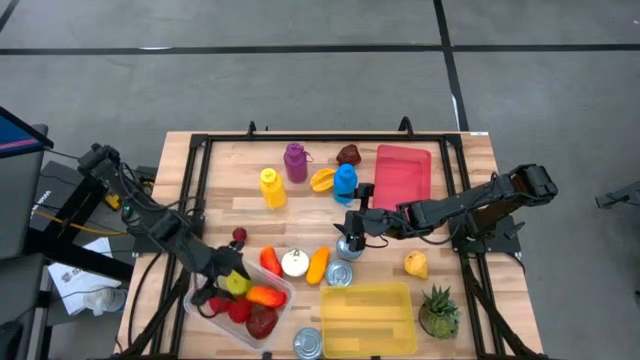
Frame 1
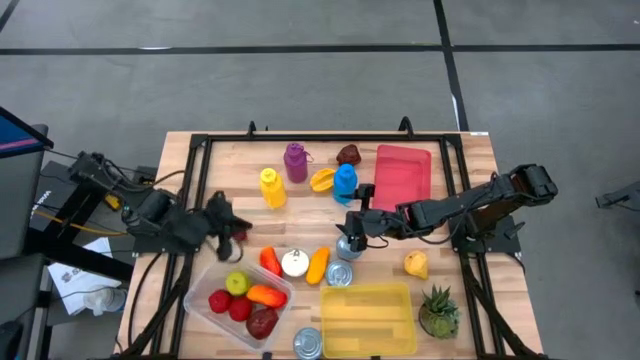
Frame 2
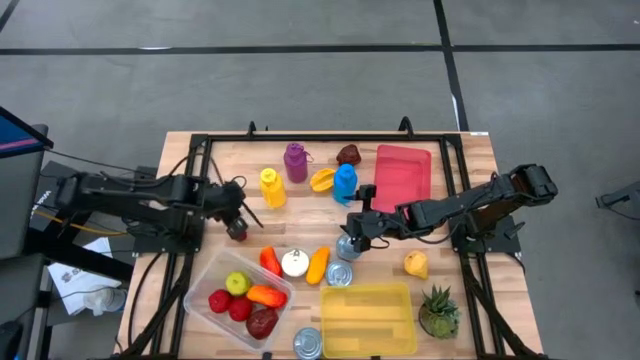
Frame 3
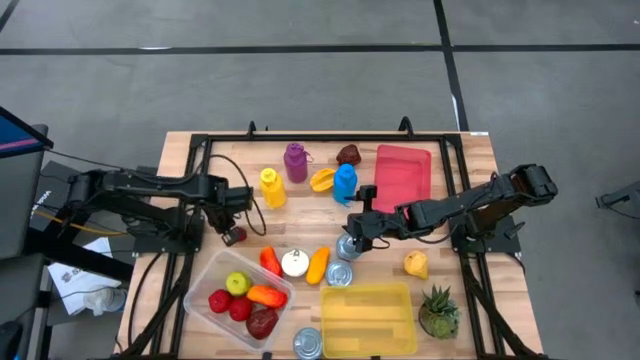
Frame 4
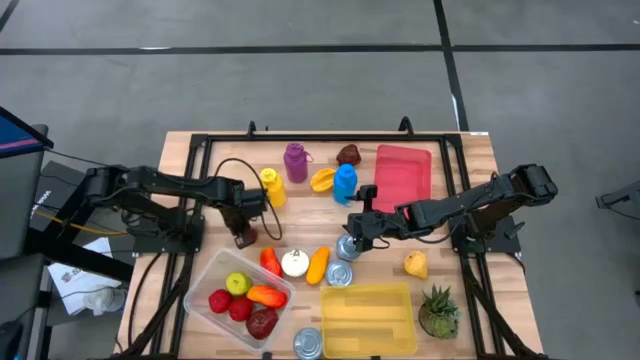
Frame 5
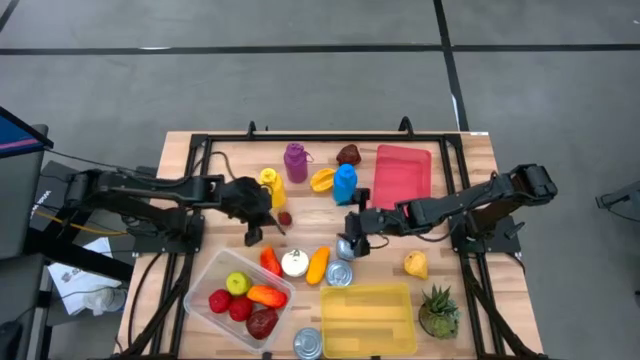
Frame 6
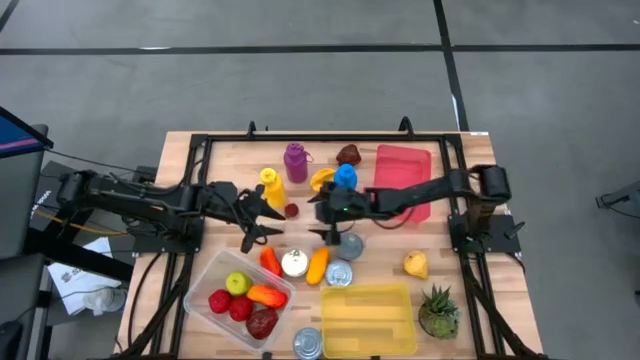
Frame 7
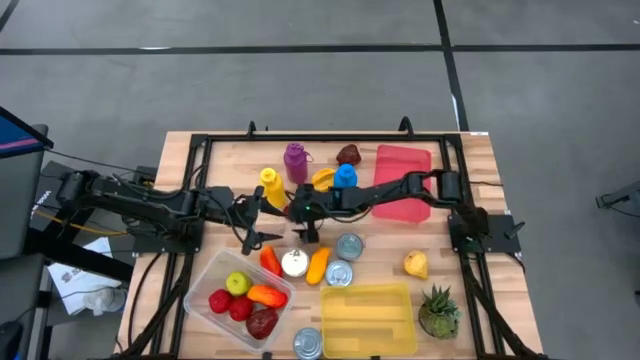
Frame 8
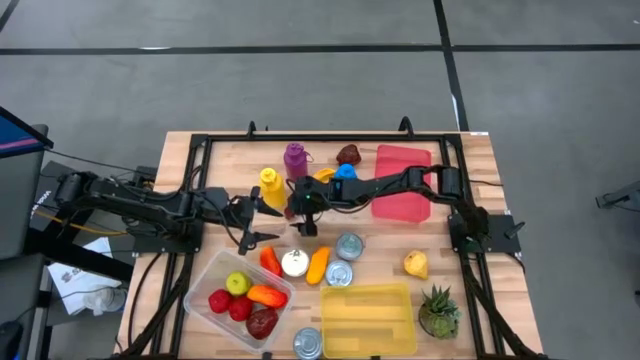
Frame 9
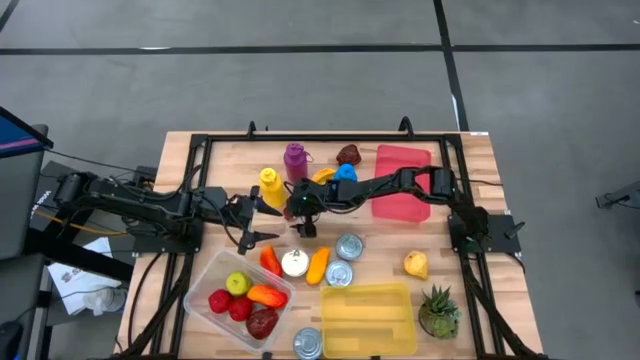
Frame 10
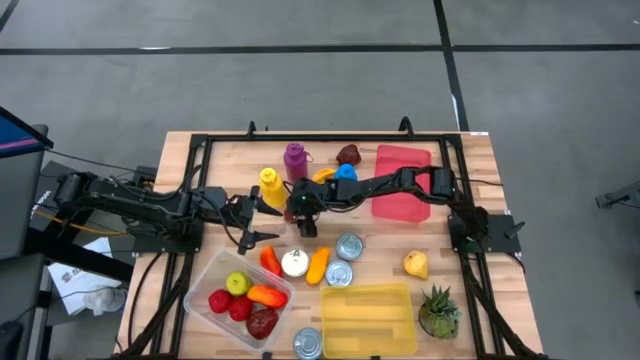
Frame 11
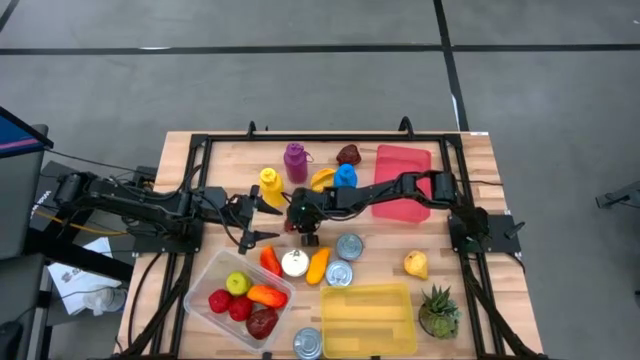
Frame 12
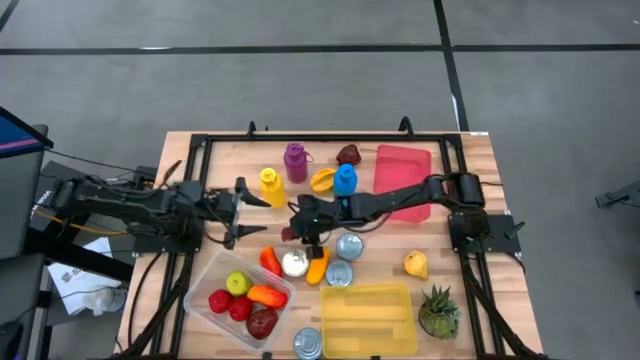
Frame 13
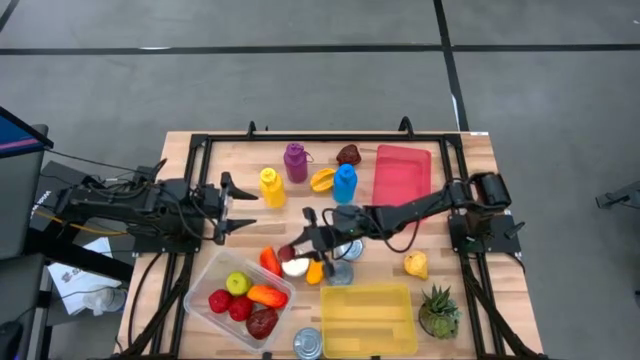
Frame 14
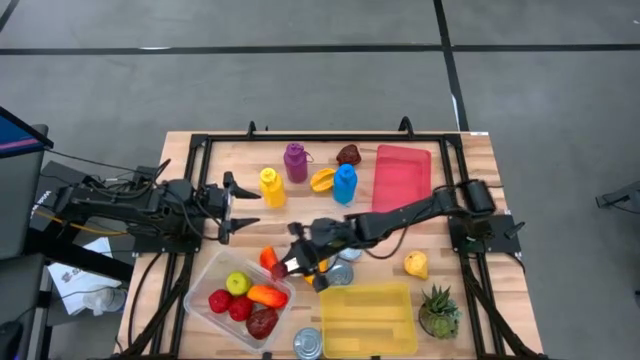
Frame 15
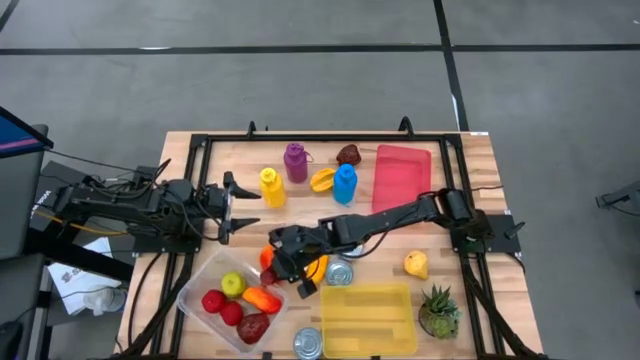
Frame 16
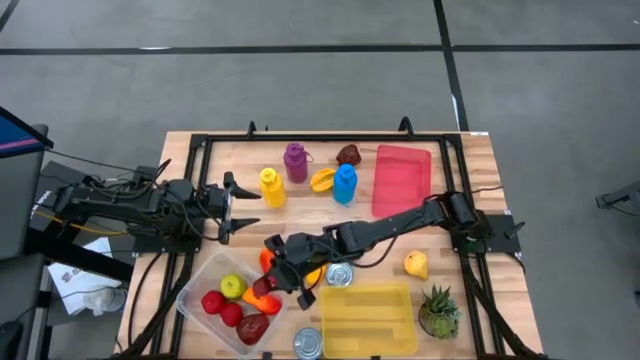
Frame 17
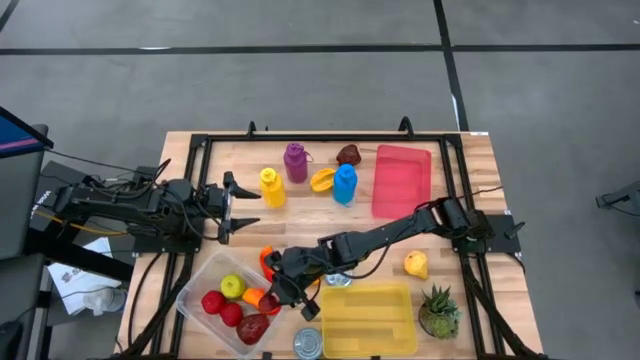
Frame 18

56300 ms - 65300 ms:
Task: Pick & Place Food Item
Put the red pomegranate into the transparent bin

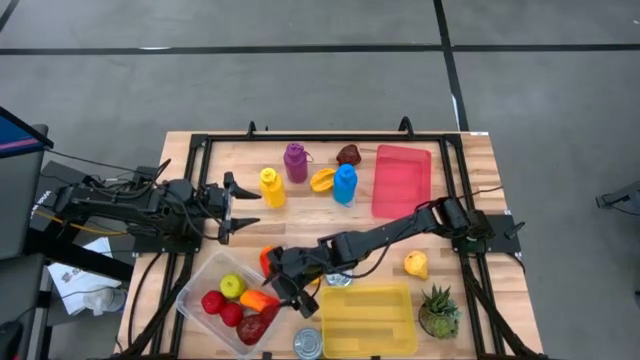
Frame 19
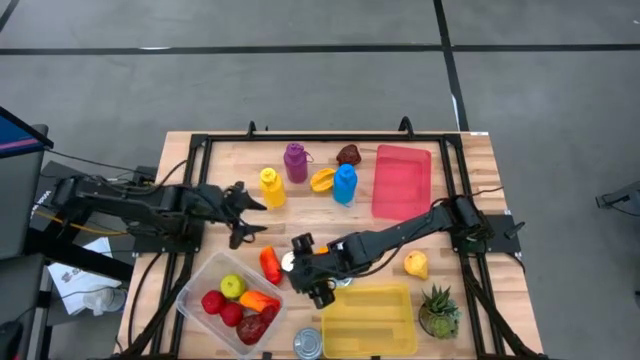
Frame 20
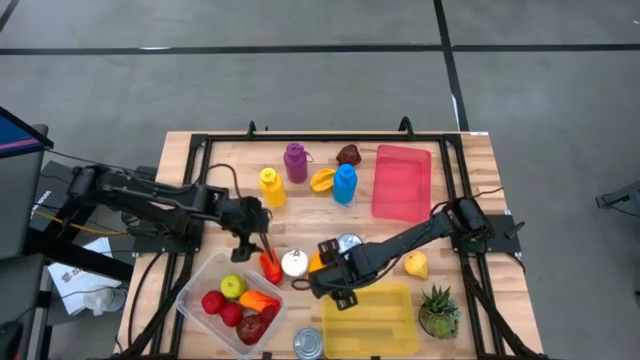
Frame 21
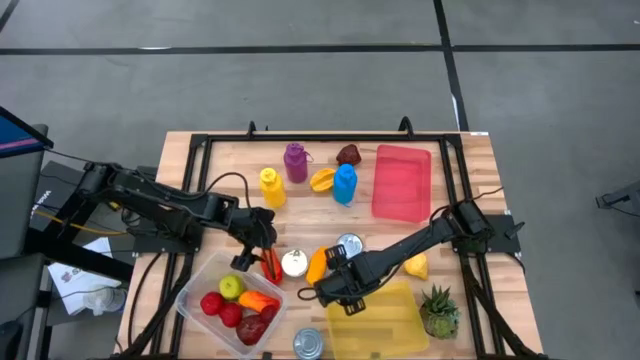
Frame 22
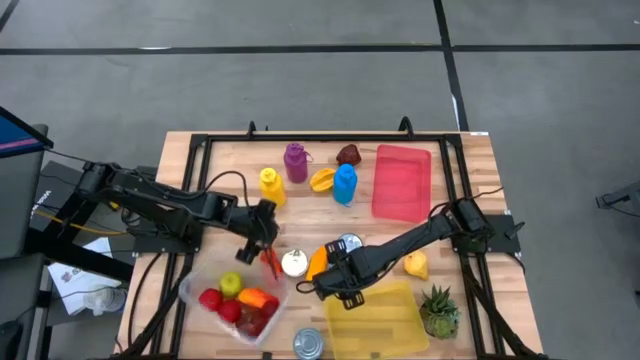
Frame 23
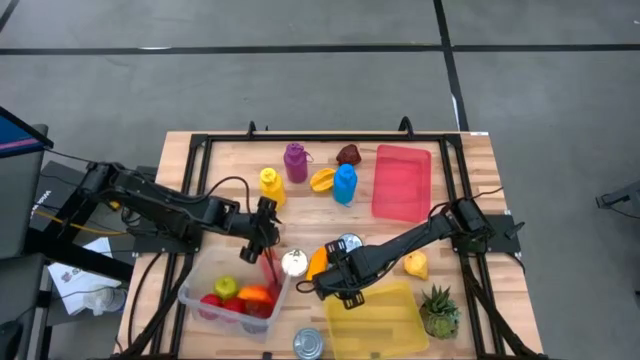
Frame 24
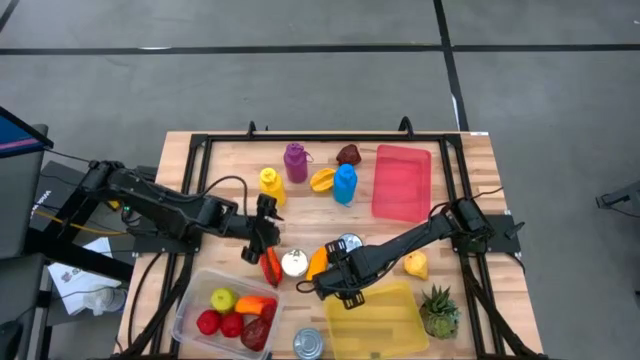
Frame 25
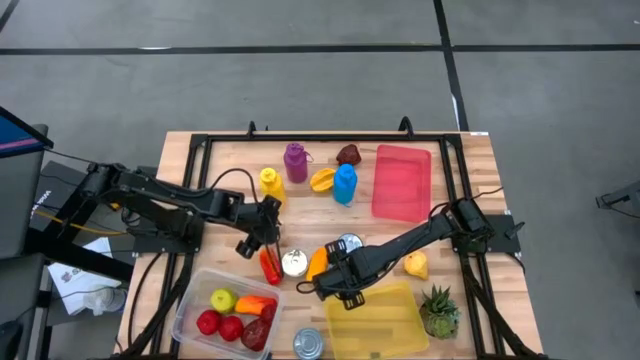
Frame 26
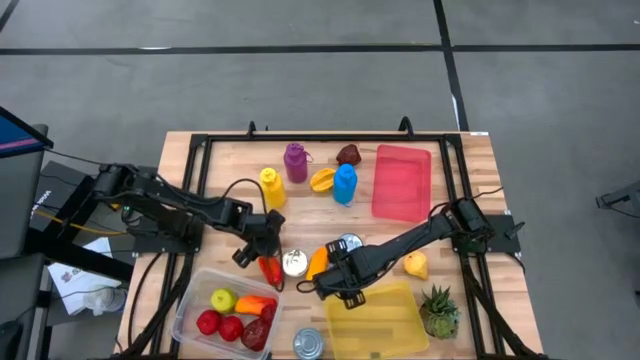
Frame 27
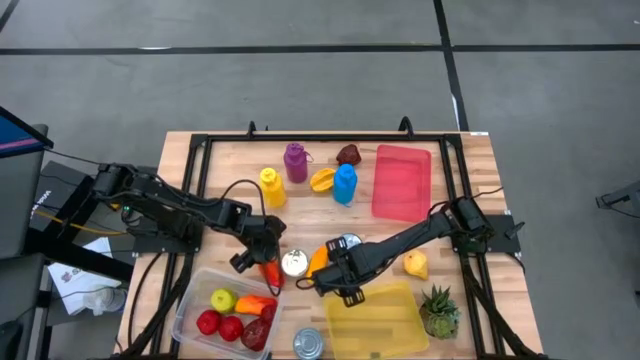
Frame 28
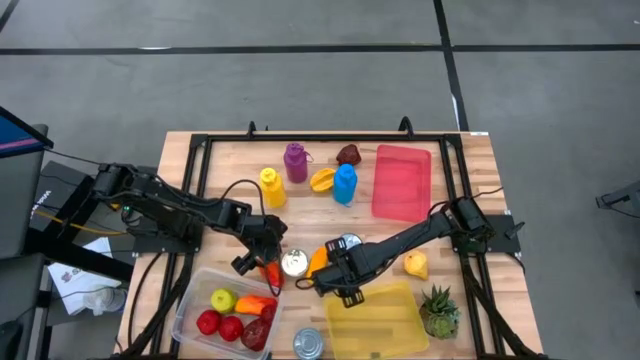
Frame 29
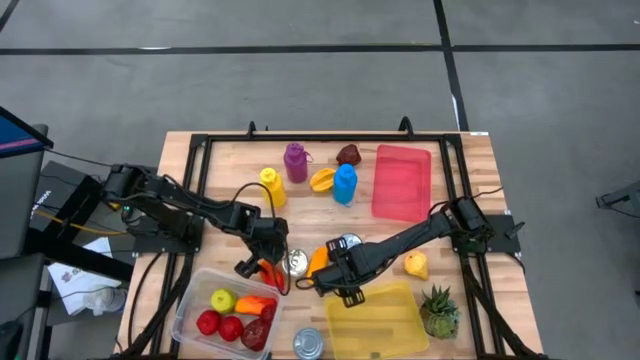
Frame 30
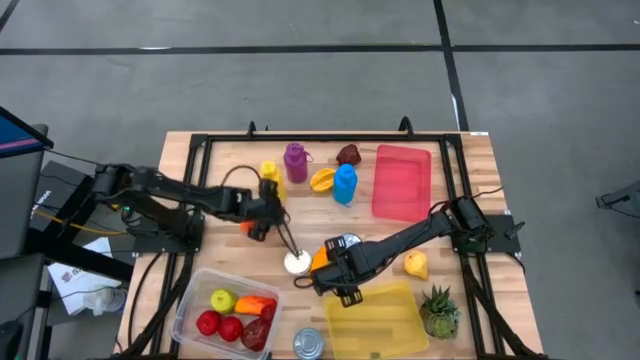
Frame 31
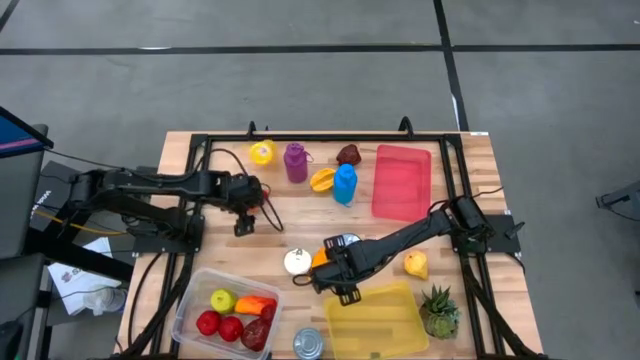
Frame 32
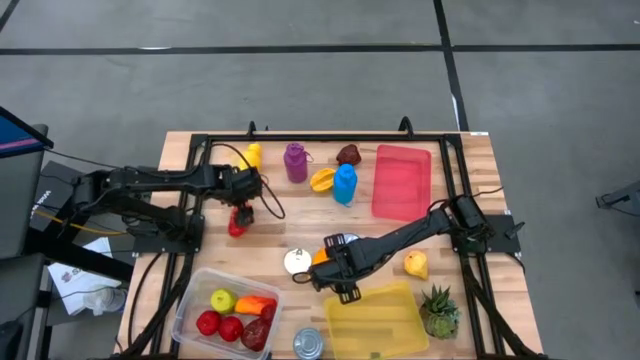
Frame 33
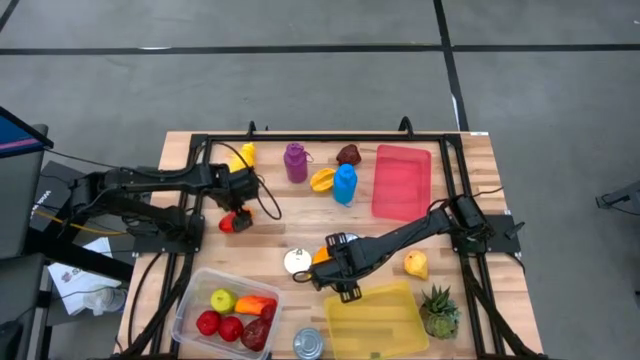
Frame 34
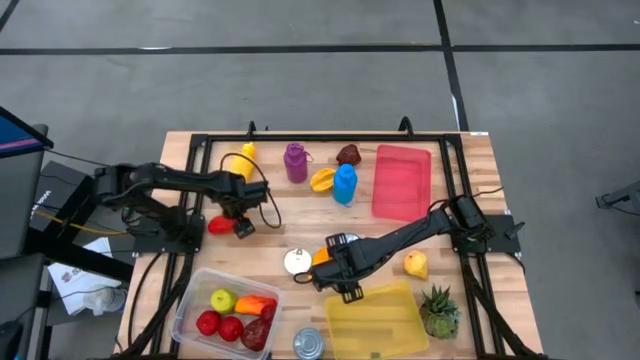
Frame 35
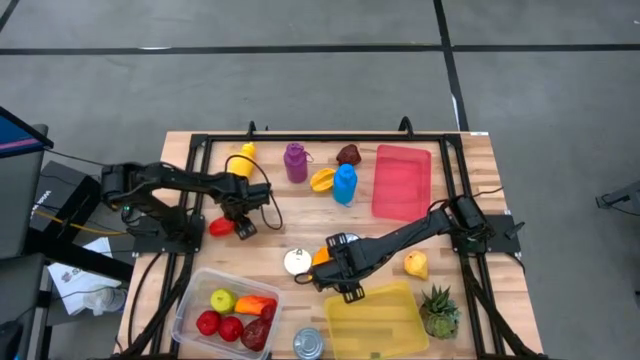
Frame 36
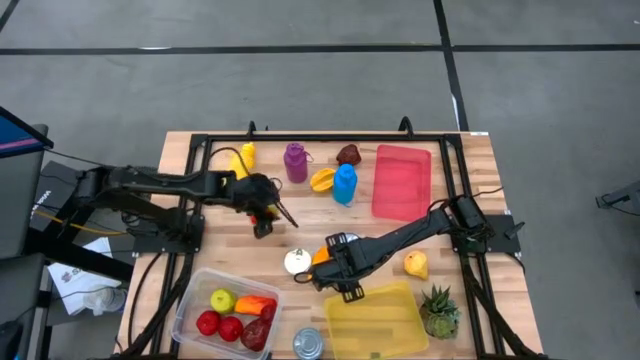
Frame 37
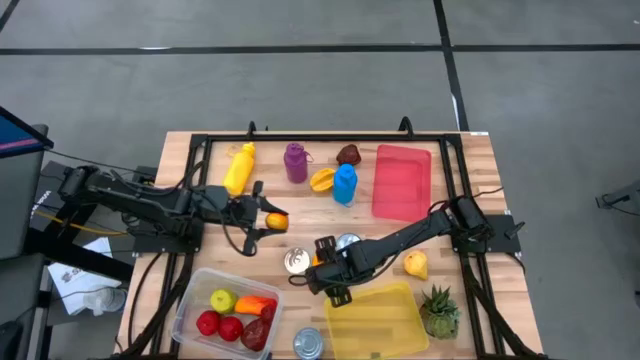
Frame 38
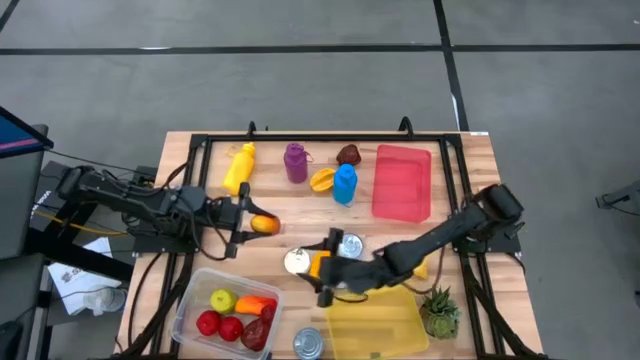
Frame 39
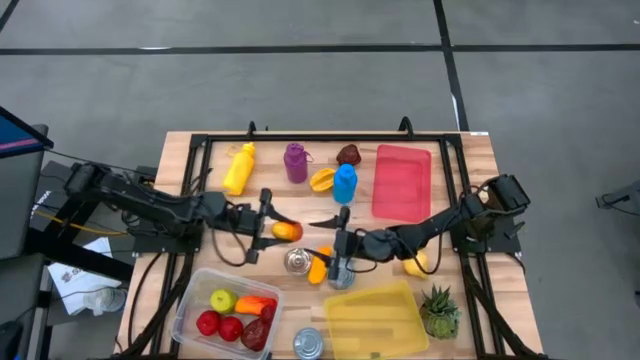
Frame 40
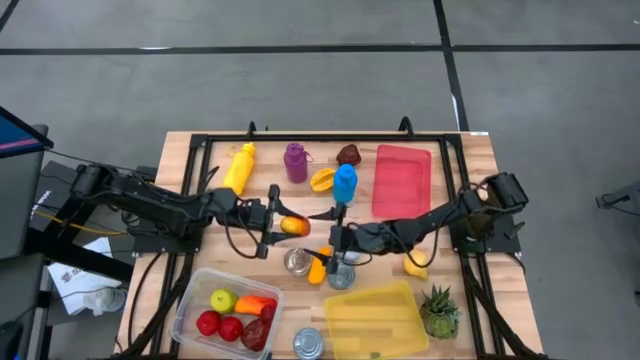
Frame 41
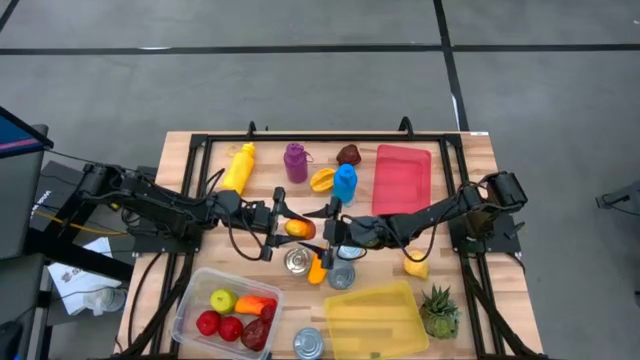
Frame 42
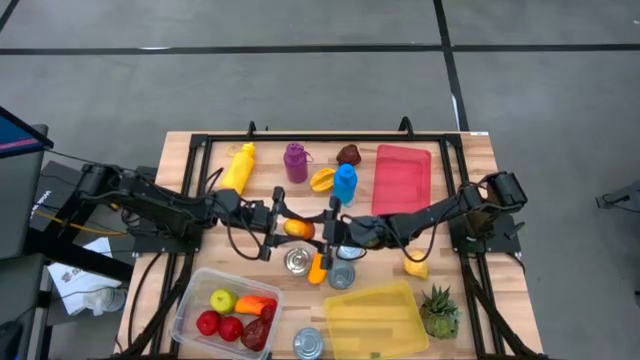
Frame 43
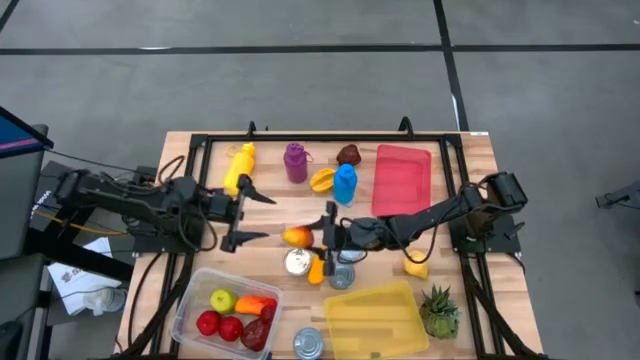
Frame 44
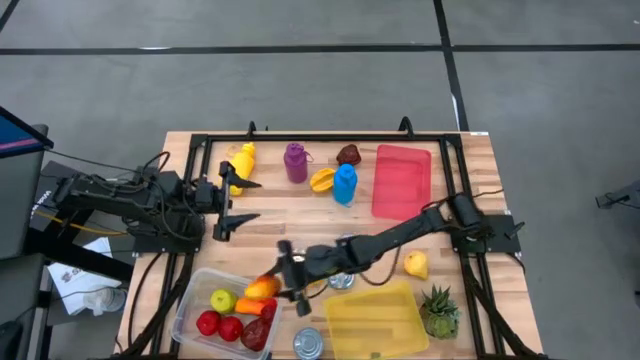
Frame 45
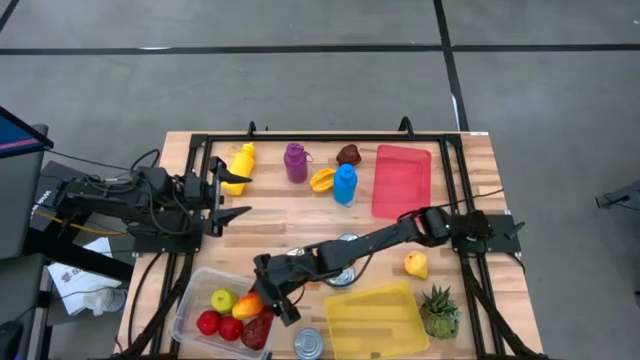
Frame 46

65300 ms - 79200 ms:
Put the orange mango into the transparent bin
